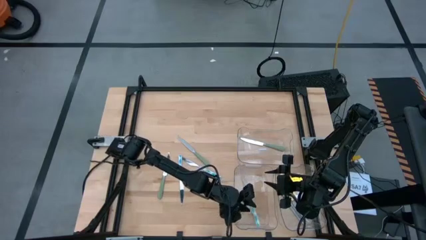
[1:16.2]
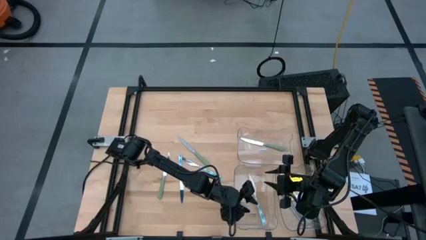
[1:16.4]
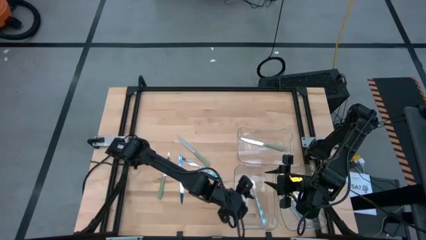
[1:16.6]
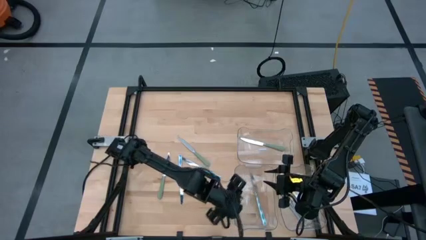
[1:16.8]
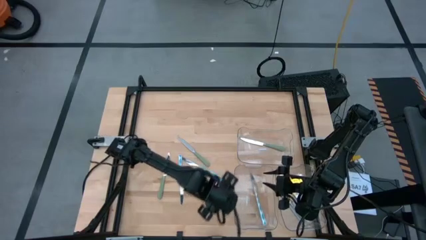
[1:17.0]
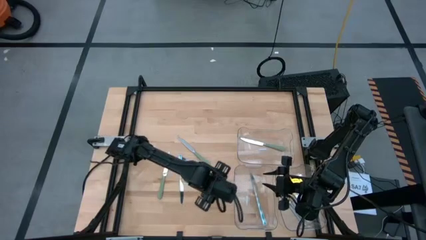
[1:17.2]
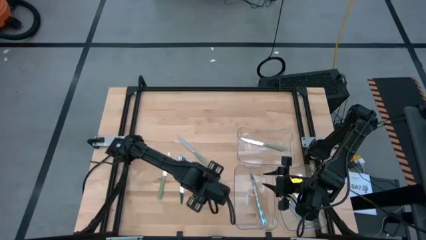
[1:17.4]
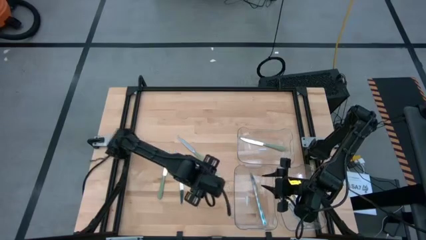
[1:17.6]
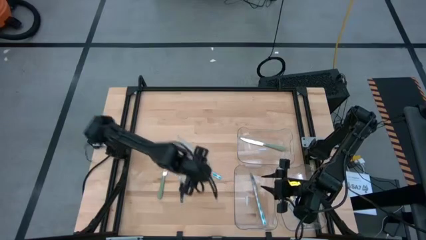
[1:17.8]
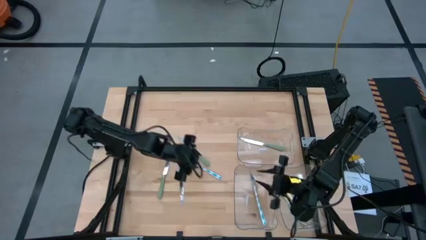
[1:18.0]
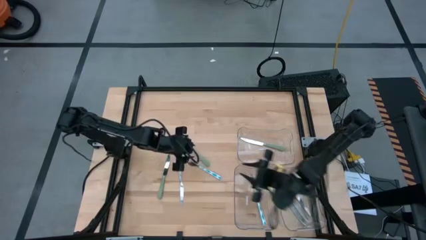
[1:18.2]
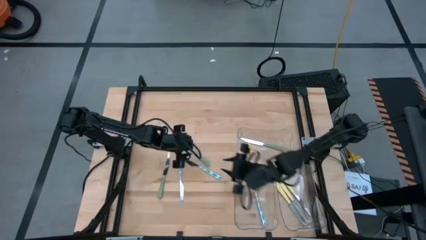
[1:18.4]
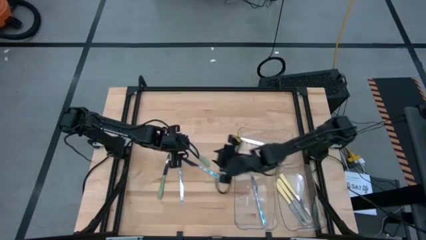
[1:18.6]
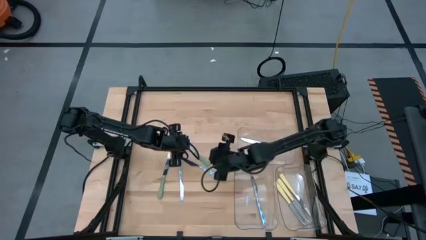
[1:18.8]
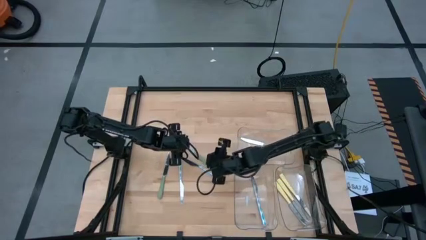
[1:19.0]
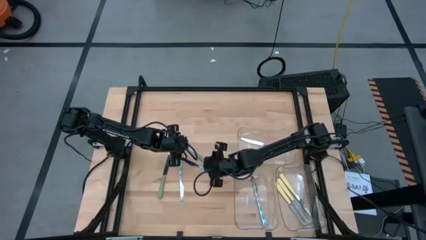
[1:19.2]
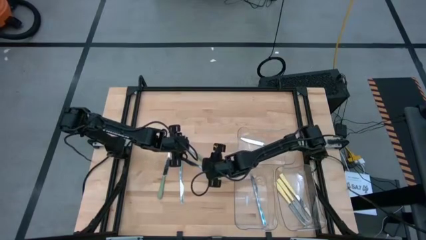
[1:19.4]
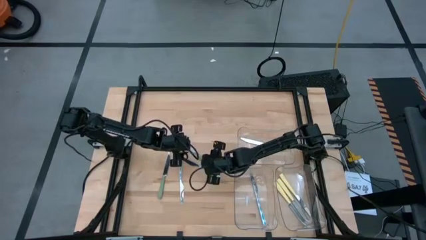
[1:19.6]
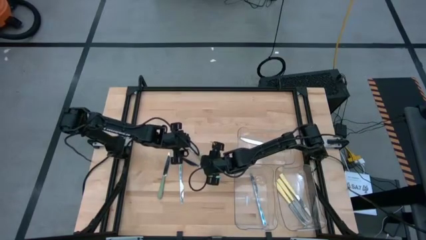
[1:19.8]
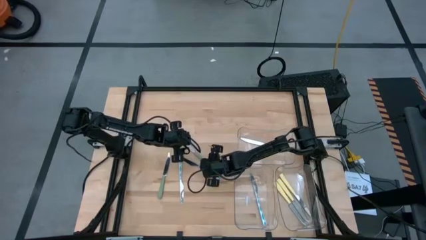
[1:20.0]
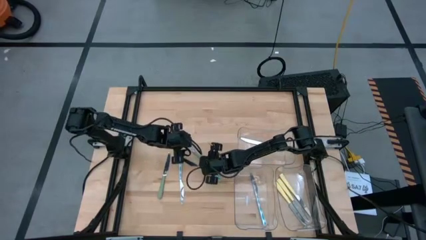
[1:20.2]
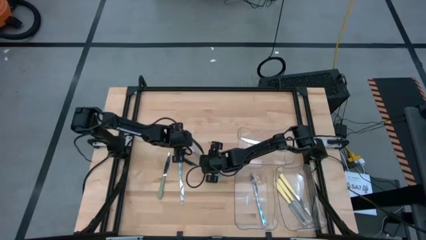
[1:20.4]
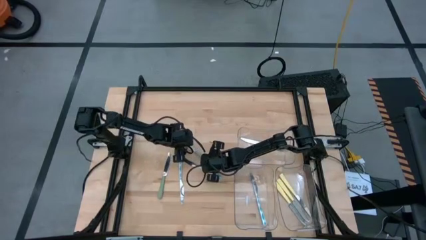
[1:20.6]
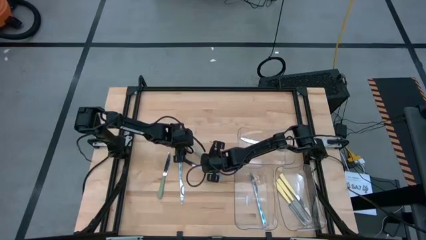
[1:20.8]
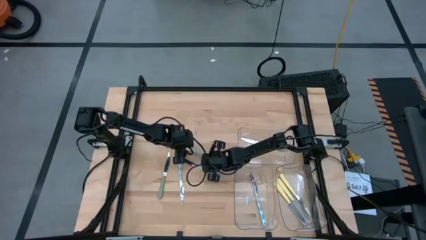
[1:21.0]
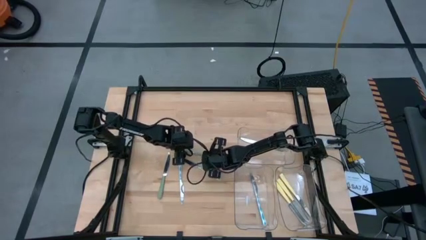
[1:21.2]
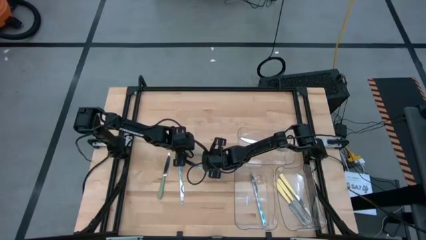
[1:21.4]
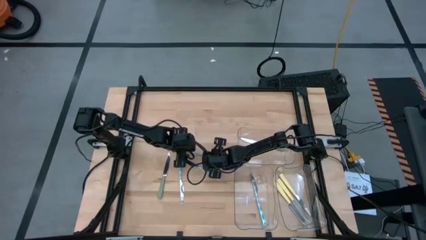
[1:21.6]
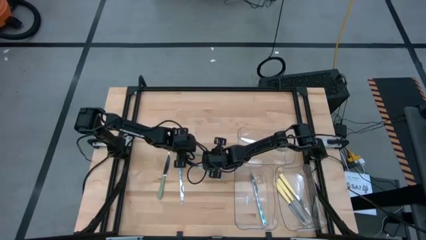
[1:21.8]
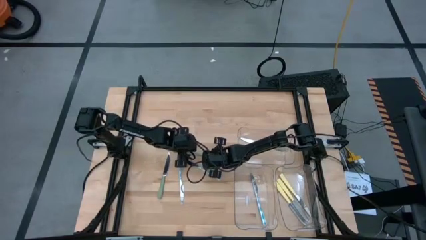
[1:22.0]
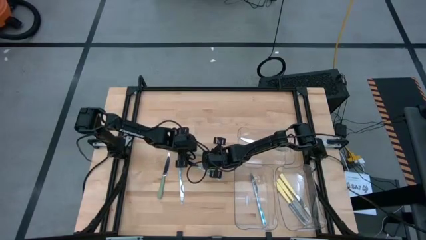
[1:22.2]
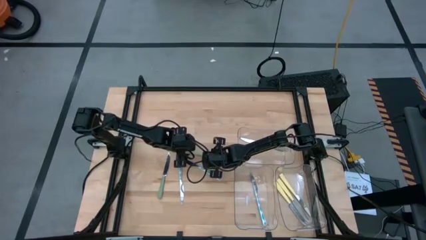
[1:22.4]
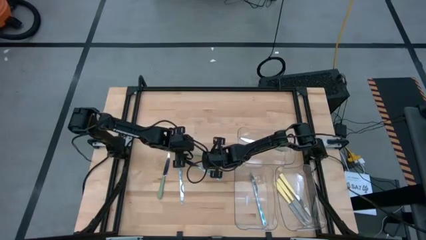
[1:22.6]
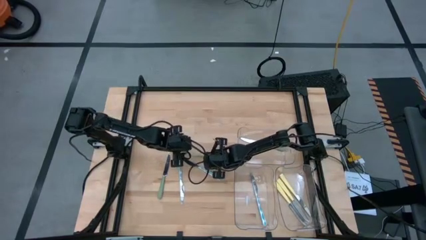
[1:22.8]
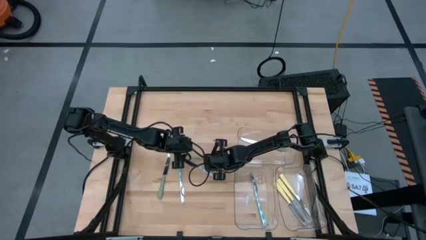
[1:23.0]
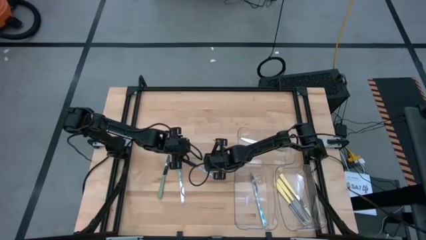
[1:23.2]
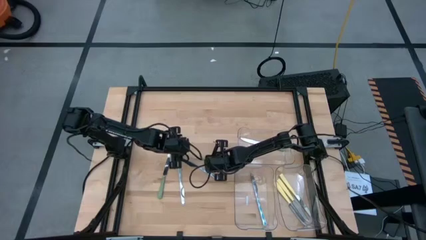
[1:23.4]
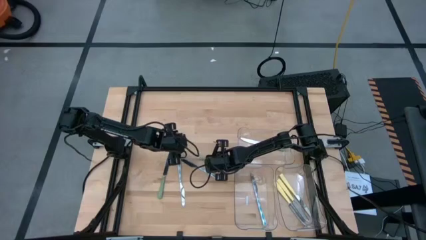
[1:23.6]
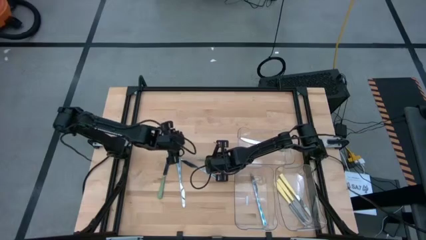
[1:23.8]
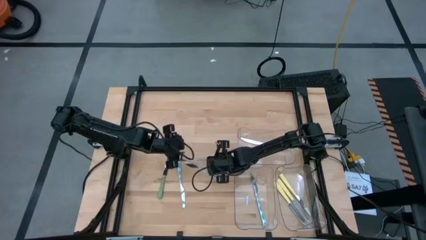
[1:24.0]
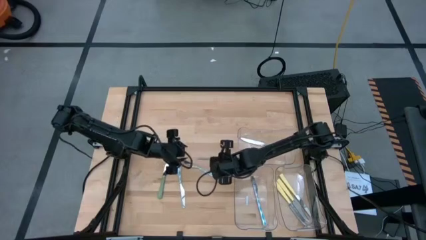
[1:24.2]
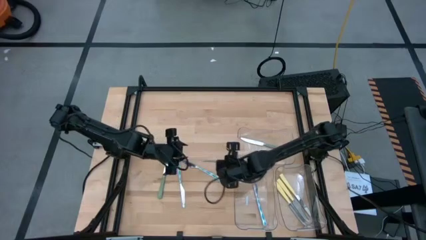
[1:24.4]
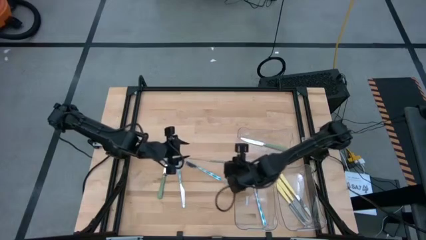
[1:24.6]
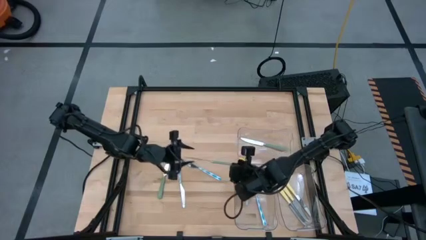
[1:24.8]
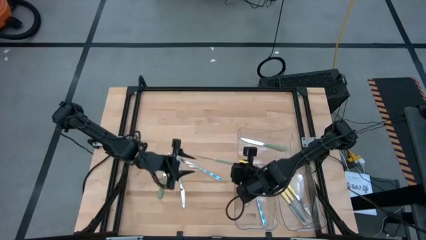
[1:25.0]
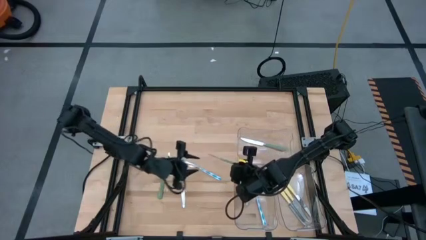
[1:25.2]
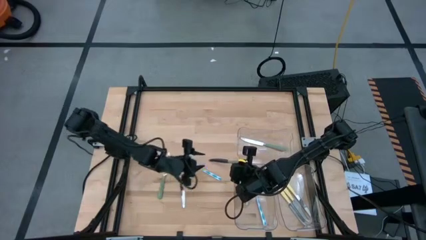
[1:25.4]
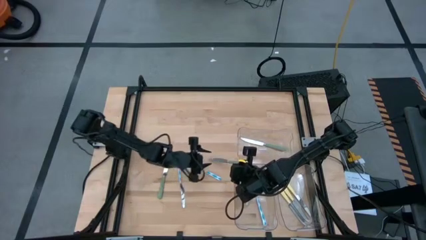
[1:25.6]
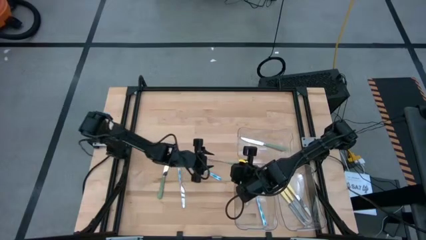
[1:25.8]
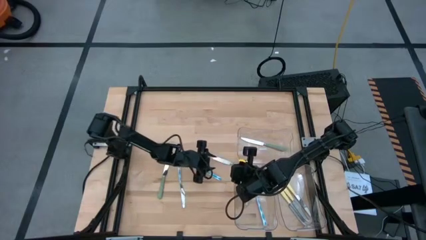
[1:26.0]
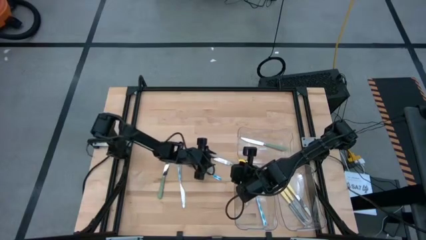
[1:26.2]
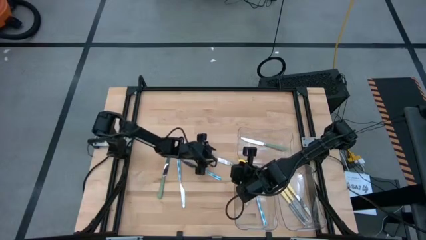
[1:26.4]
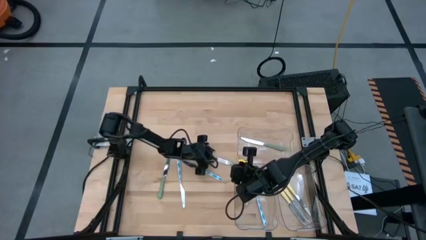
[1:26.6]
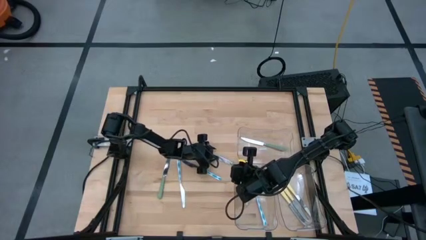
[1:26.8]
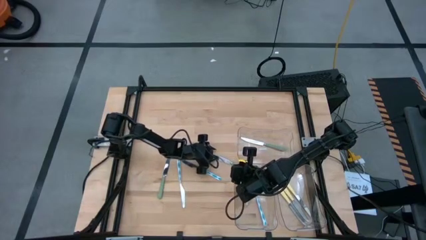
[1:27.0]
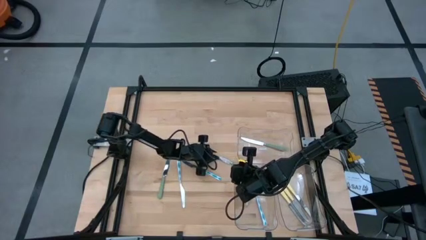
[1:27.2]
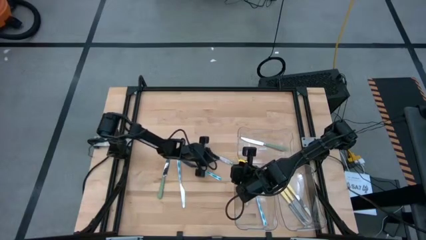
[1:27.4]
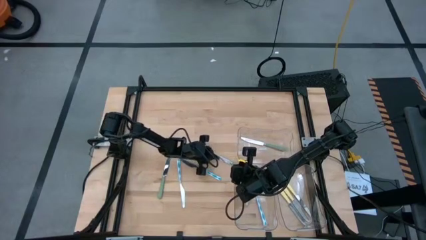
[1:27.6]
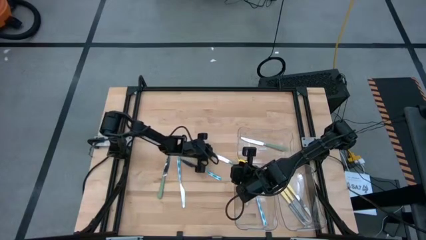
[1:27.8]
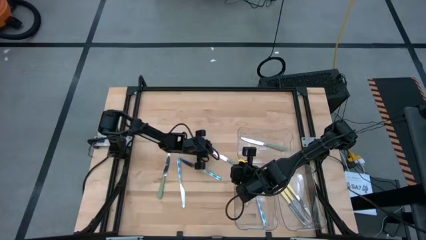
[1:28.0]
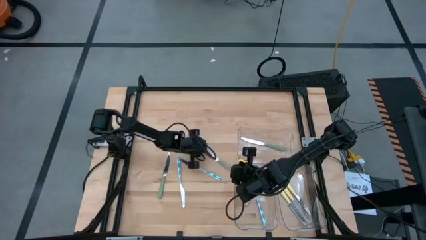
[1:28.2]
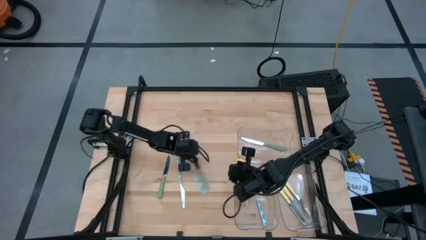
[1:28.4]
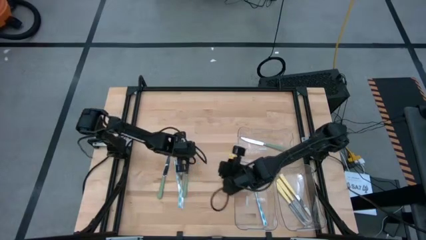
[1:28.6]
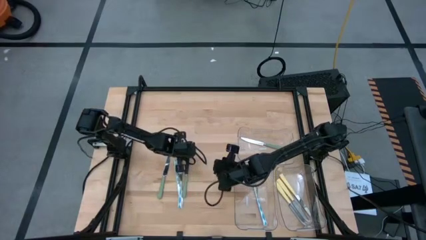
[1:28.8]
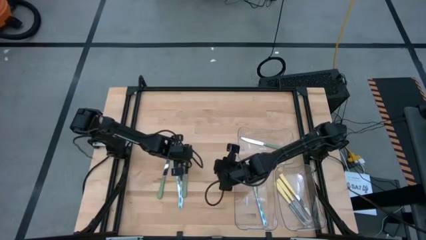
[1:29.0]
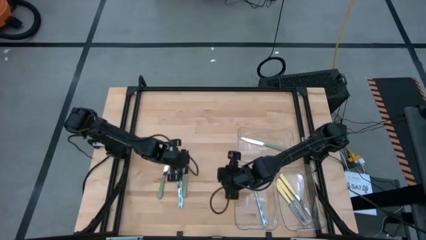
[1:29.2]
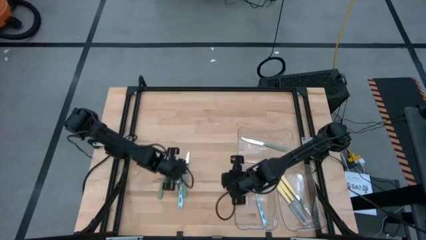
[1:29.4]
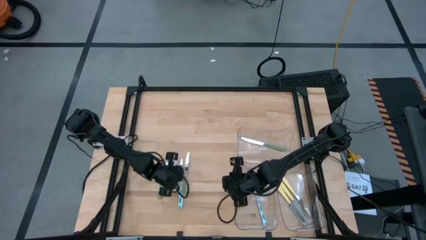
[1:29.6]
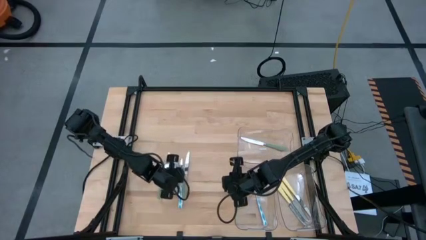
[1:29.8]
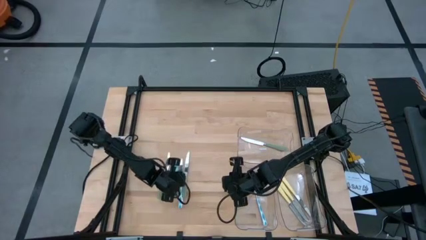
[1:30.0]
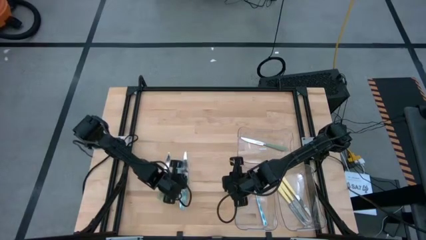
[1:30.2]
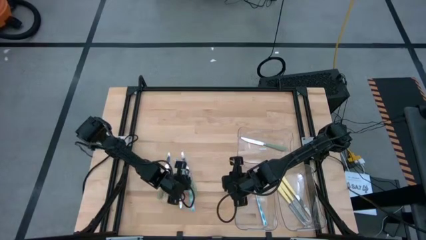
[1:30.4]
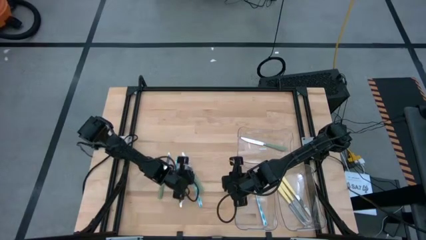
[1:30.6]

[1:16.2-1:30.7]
Task: Sort silverware by color (type)
Put the green knife into the top transparent bin

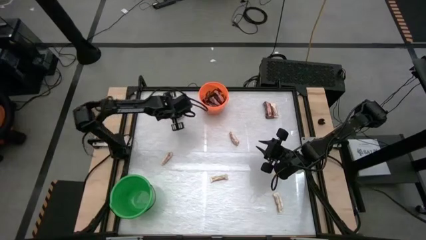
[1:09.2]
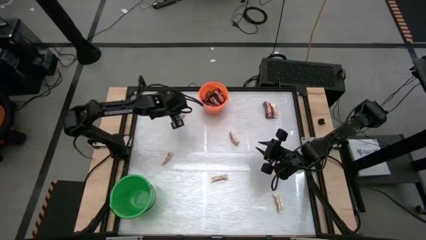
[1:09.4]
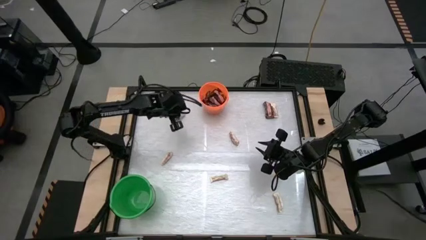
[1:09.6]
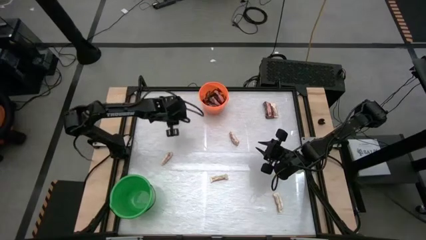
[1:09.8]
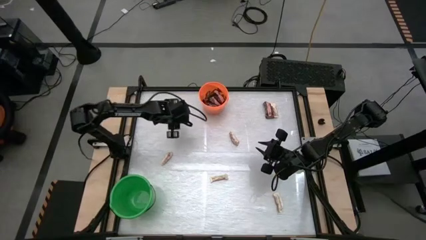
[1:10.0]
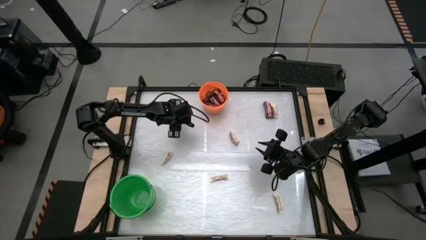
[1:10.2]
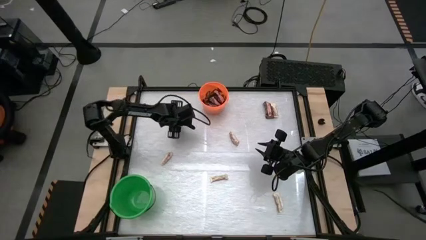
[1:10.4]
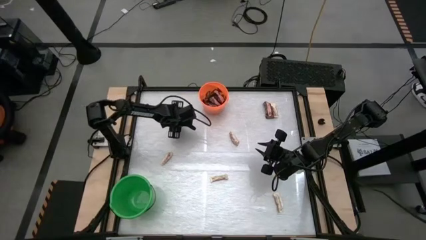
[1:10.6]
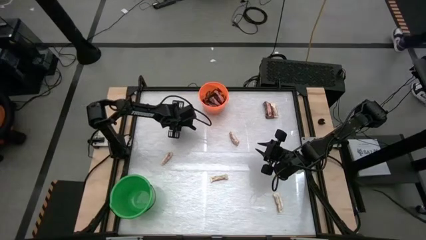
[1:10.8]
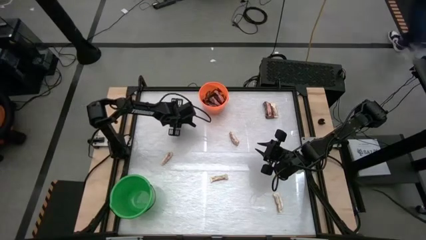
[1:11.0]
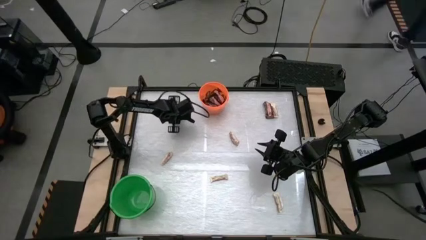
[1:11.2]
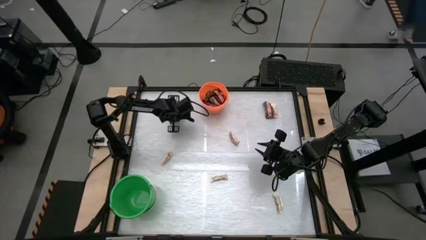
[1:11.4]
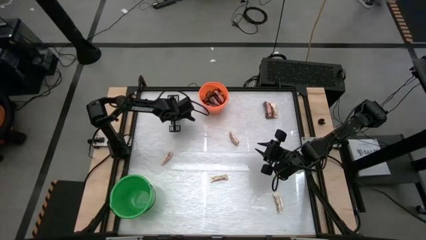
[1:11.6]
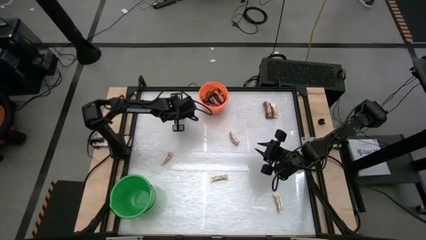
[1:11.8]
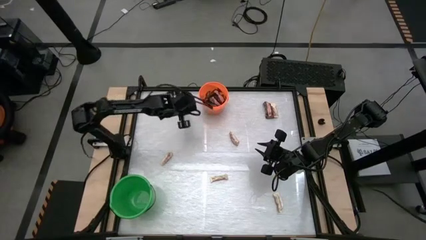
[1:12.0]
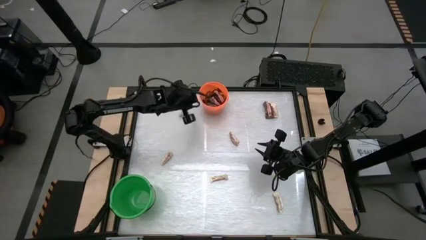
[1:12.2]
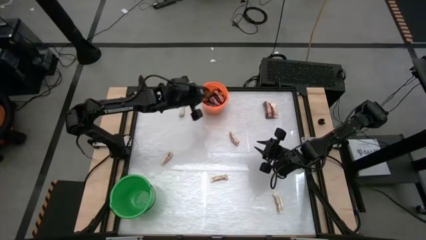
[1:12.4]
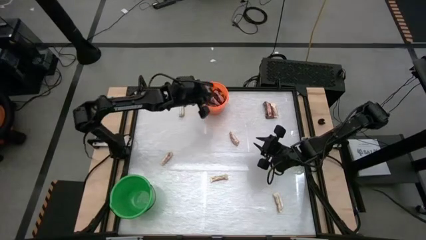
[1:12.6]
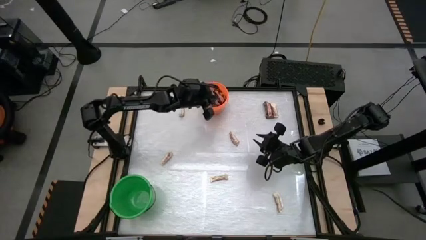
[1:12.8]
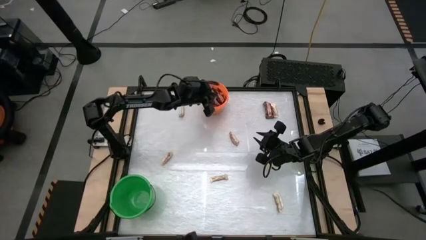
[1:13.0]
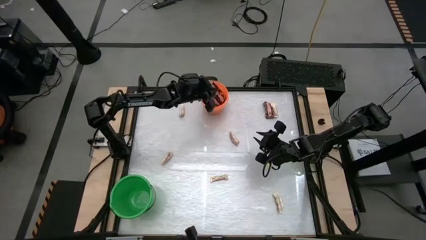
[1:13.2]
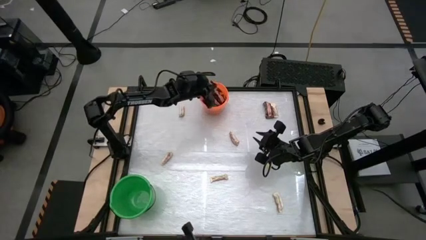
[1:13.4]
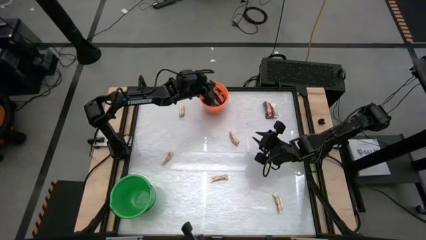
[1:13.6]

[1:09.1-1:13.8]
Task: Sort candy by brand, put in halloween buckets
Put the brown chocolate bar into the orange bucket
